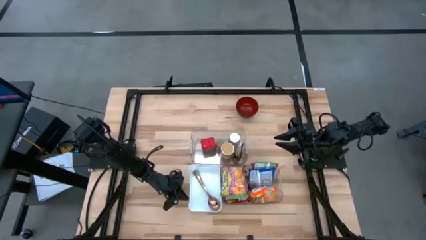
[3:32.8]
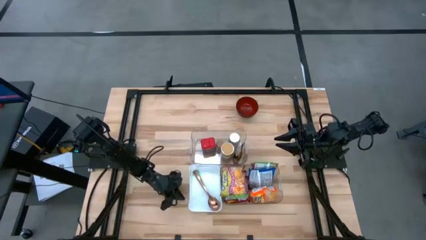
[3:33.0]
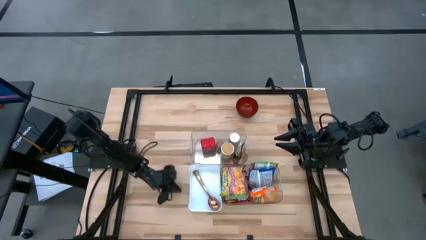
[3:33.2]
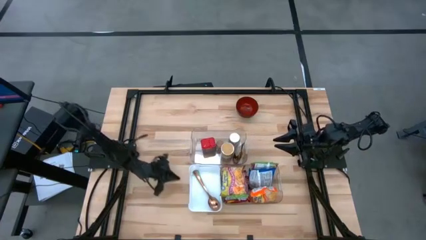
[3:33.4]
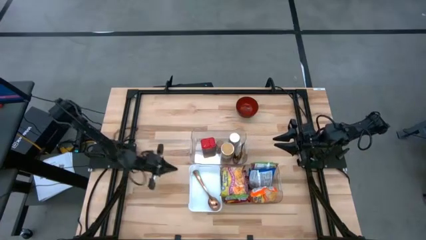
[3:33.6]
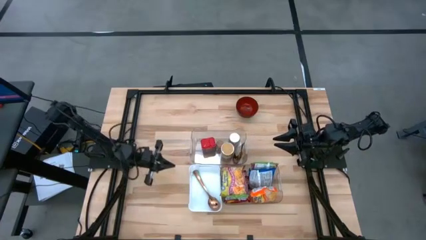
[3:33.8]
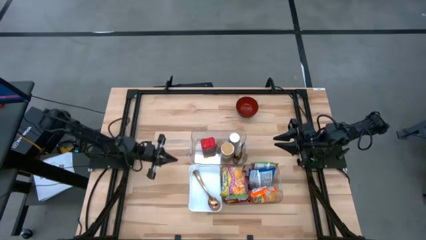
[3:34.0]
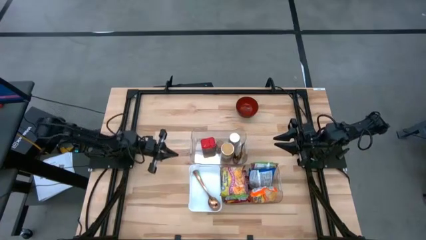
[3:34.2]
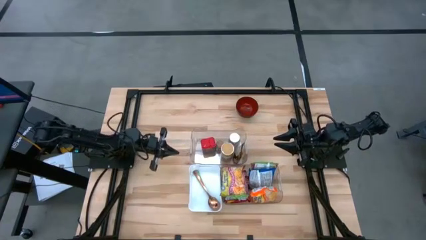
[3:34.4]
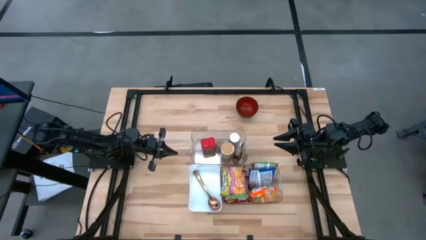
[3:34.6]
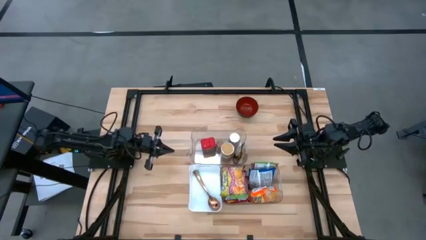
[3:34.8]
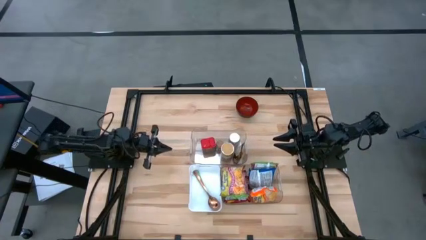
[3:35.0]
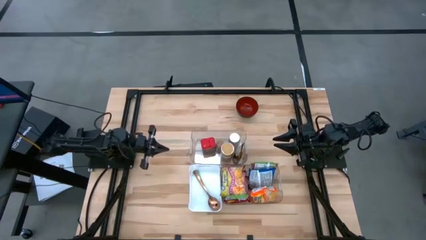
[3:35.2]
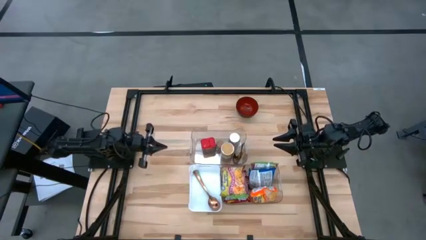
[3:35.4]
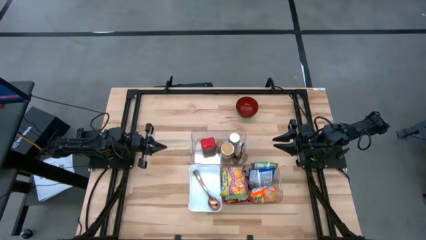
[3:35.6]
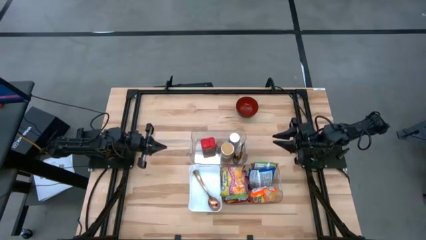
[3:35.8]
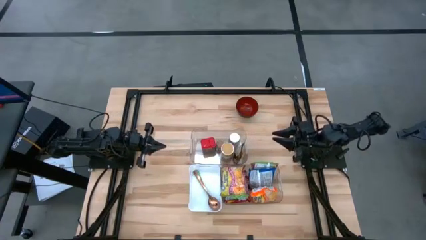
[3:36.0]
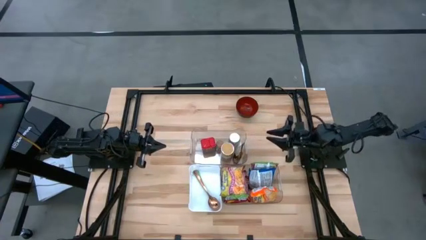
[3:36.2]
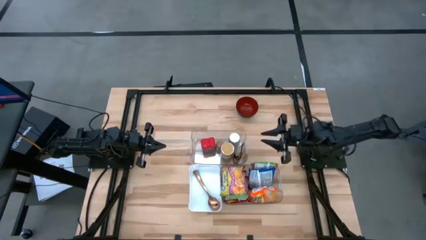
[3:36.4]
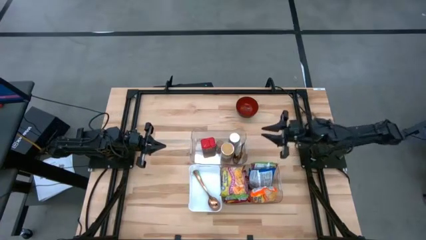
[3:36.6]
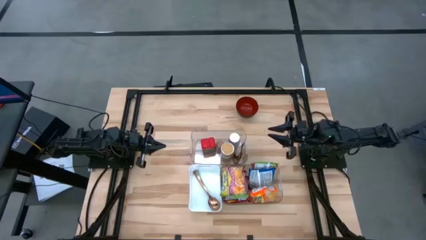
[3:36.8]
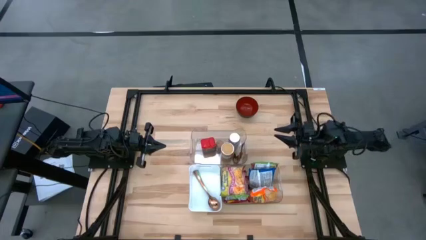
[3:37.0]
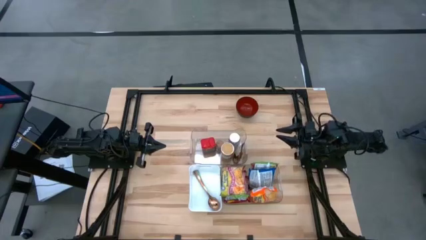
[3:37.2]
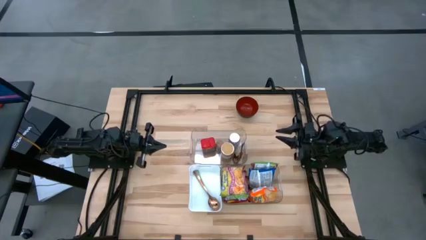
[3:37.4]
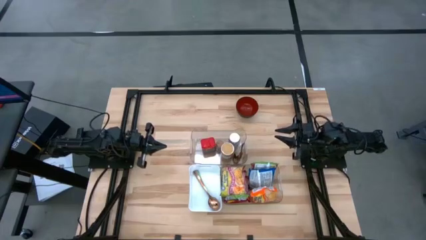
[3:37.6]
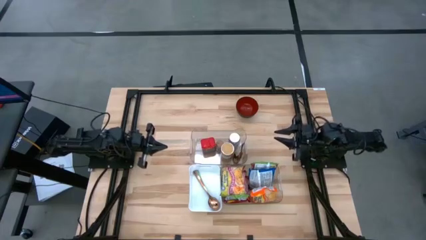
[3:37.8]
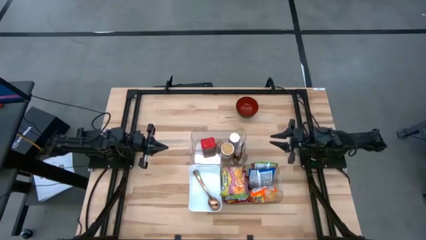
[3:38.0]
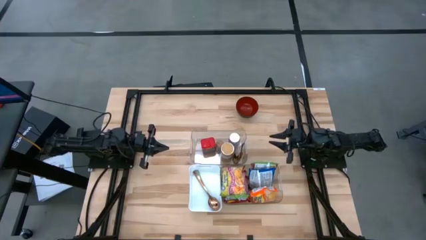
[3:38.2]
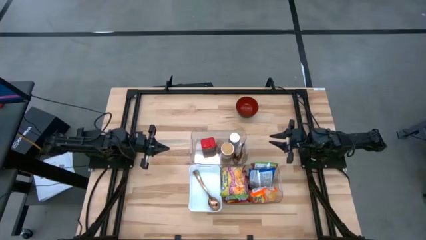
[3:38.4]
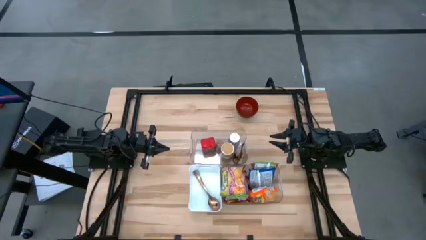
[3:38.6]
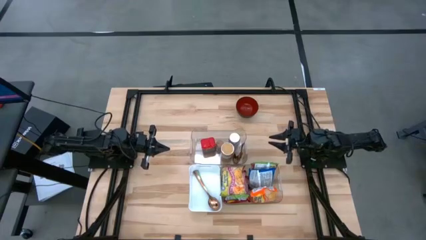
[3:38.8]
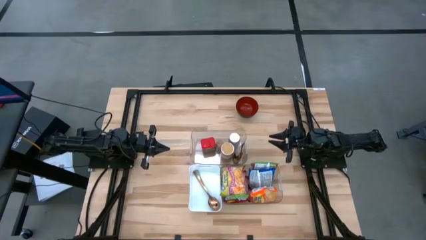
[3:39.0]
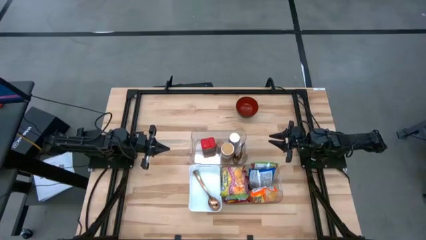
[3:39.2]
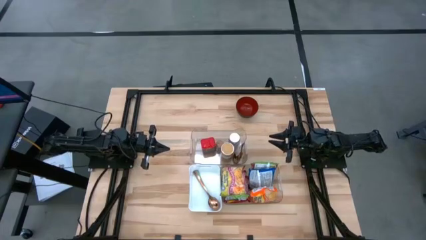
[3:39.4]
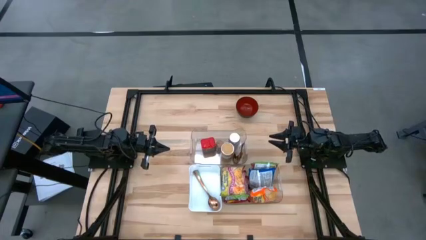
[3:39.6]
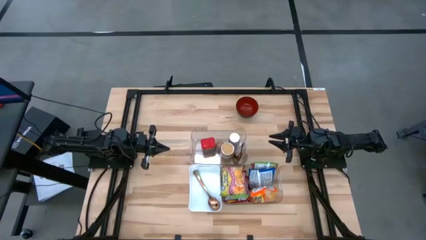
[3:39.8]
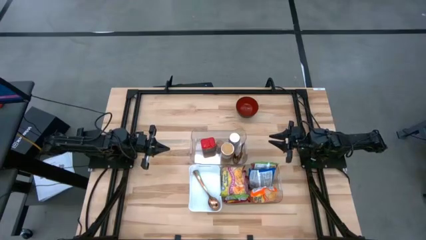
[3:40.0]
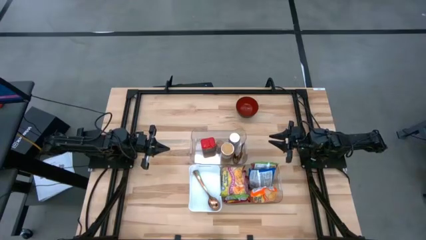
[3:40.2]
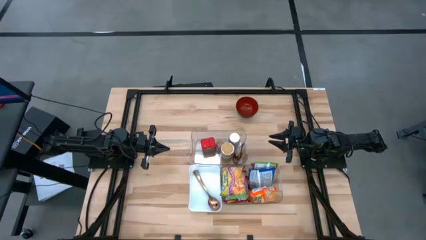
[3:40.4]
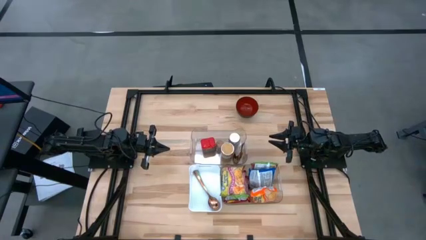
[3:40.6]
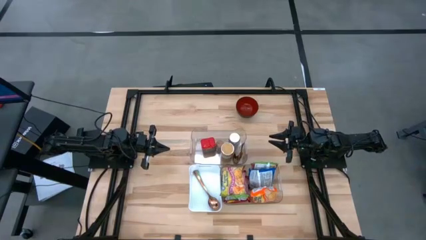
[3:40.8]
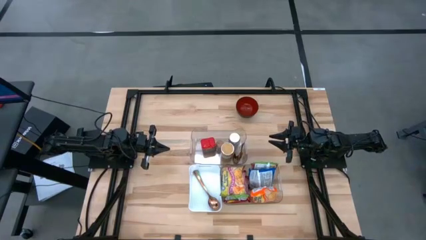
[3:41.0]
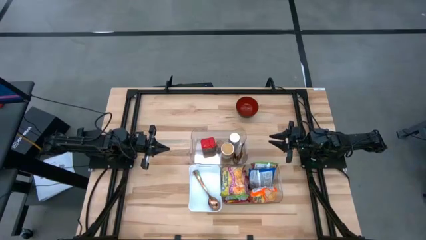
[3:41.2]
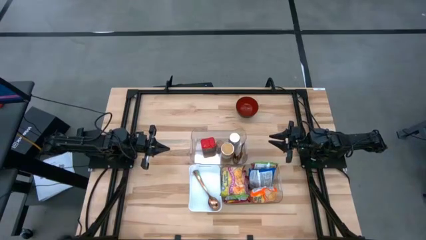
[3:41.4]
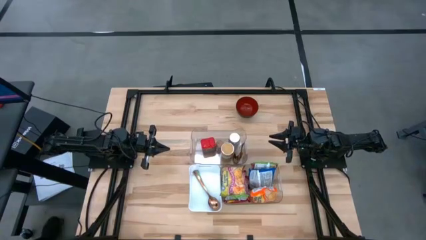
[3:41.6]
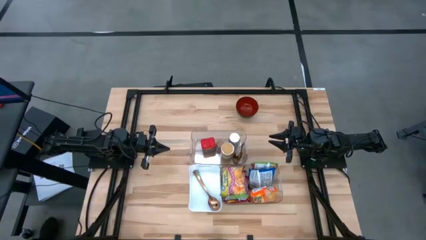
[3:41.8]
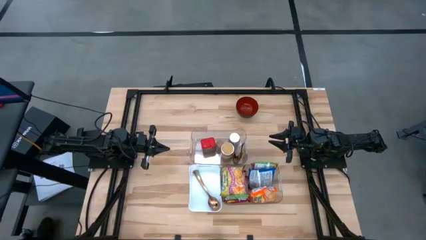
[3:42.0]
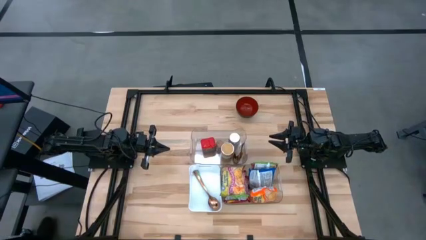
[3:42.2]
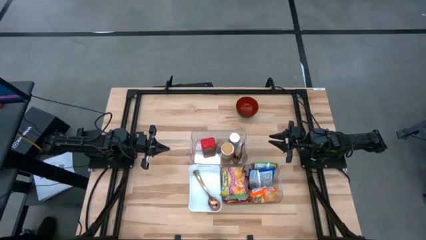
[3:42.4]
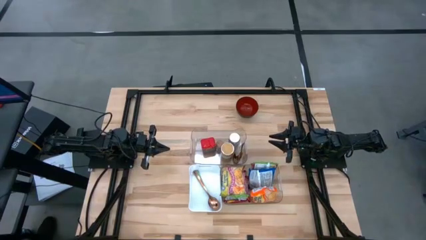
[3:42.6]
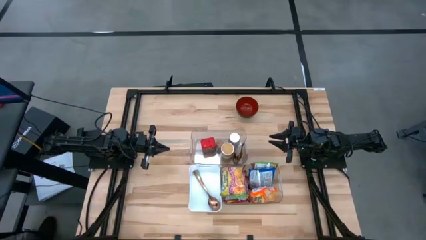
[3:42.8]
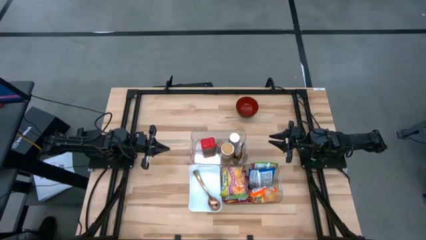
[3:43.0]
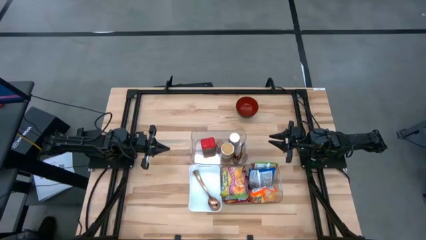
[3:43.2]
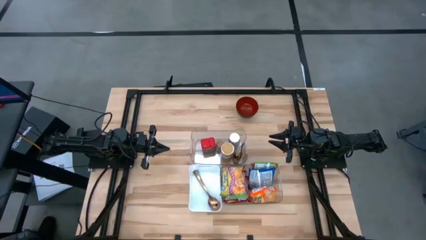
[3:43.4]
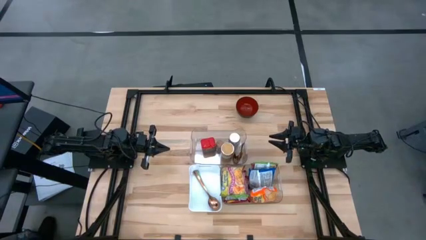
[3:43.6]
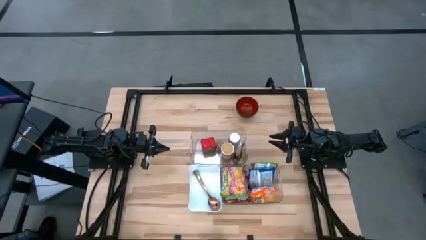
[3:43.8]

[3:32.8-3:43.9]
Task: Pick & Place Food Item
Return to Home Position
